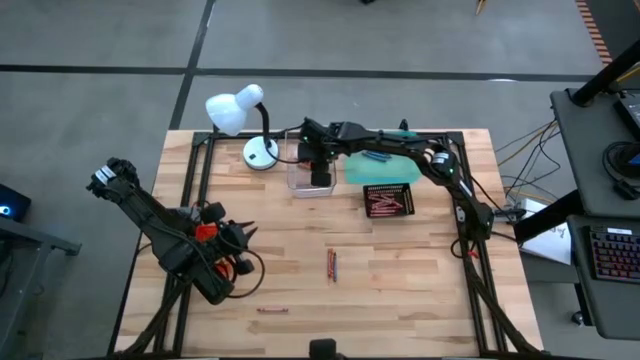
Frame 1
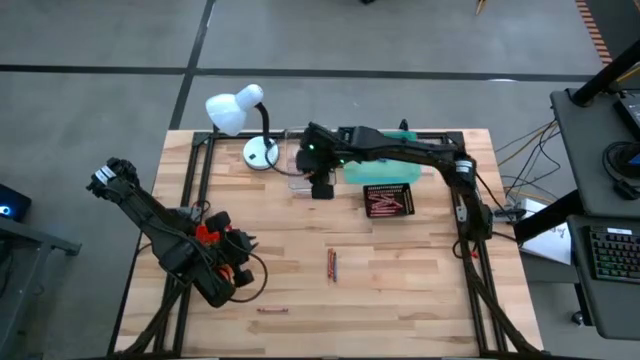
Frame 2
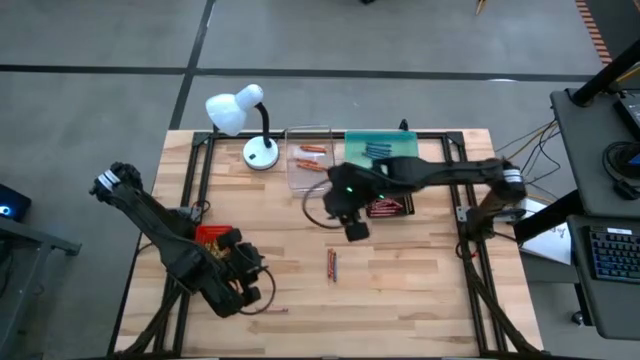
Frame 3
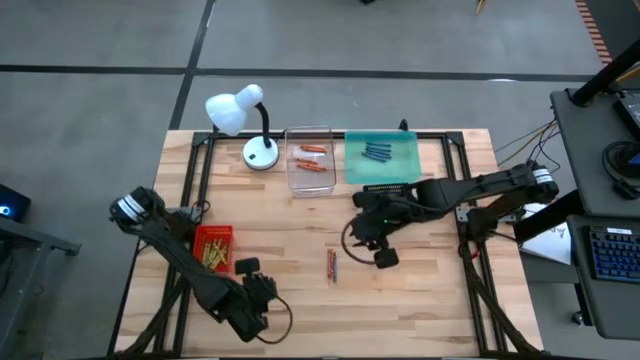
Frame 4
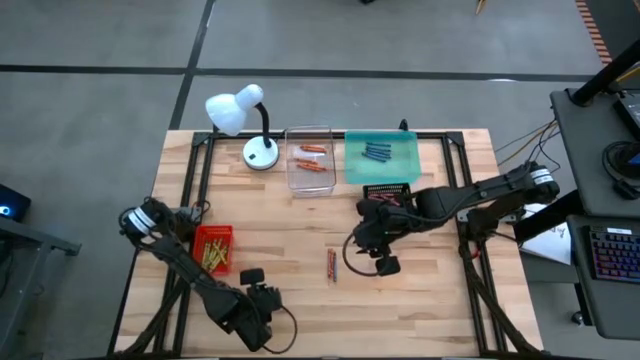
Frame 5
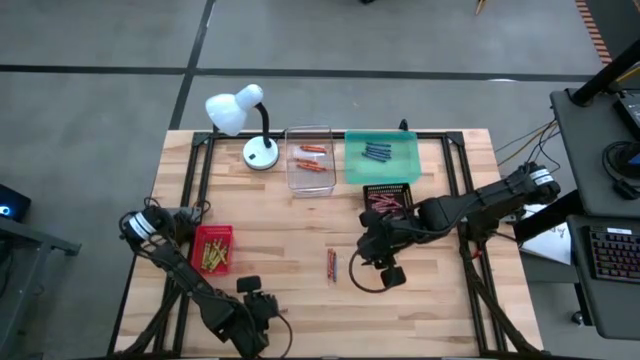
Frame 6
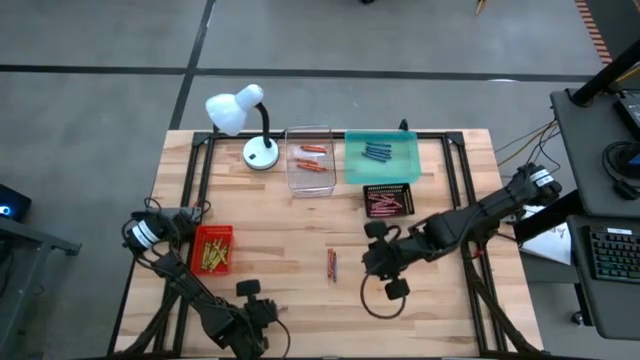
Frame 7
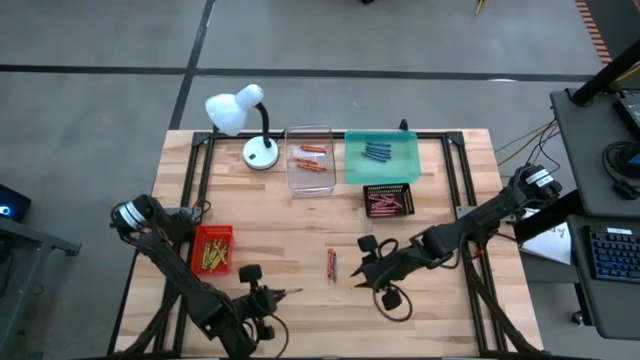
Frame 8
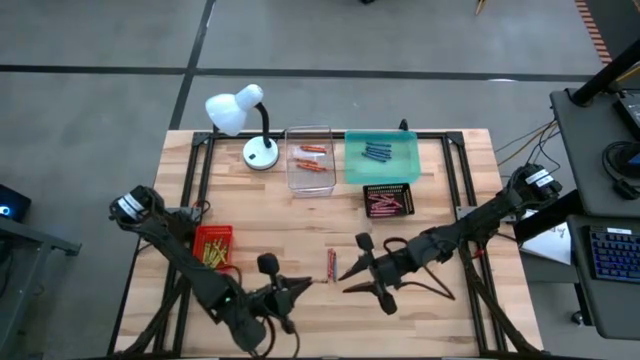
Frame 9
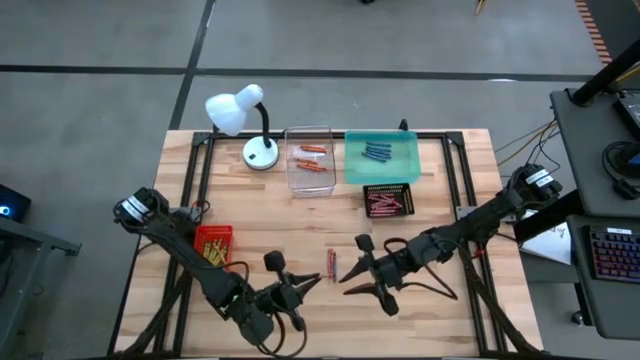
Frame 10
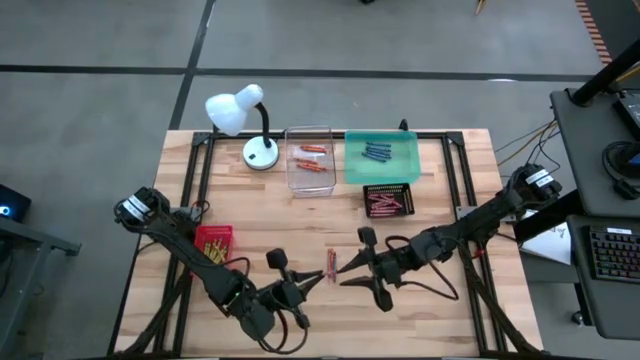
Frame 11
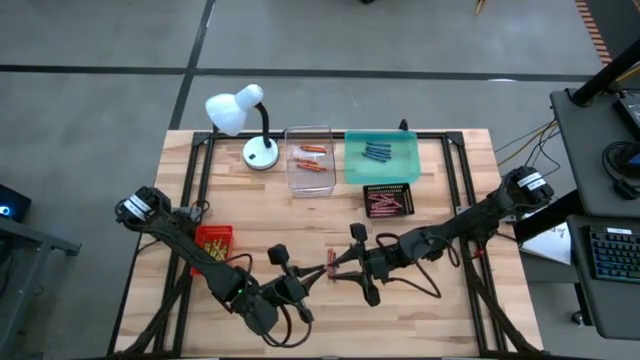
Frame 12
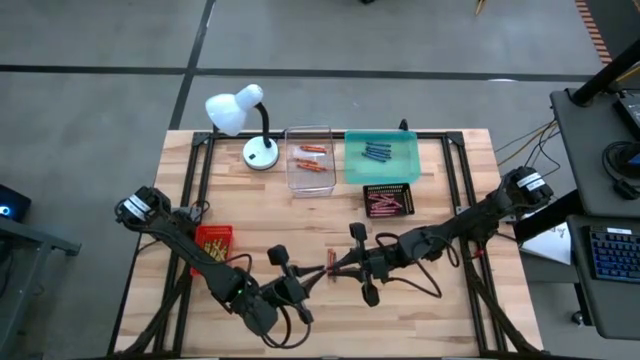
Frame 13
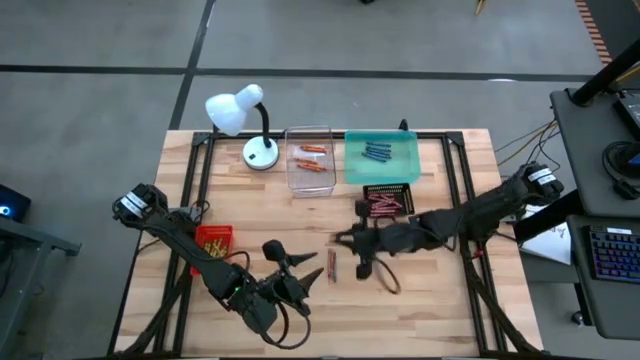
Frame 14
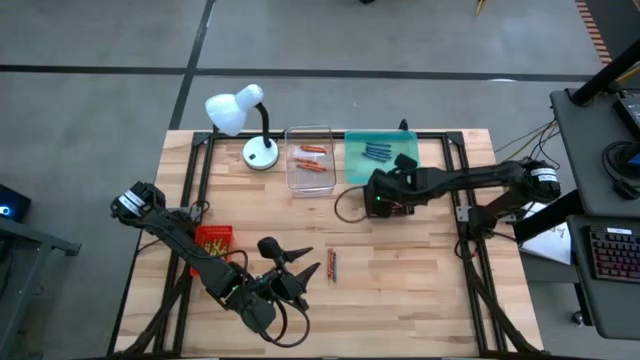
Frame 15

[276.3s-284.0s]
Task: Sort crayons
Put the red crayon into the black bin

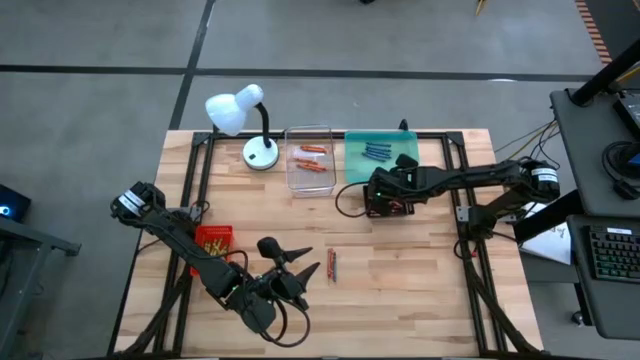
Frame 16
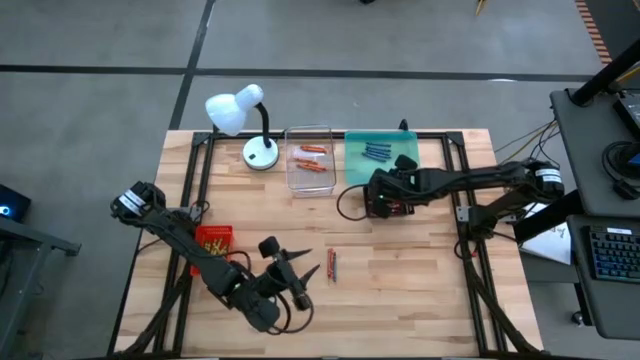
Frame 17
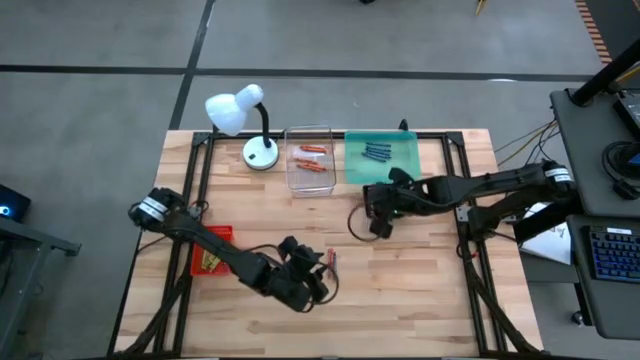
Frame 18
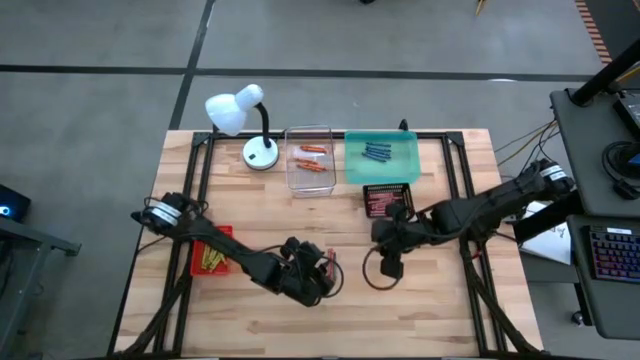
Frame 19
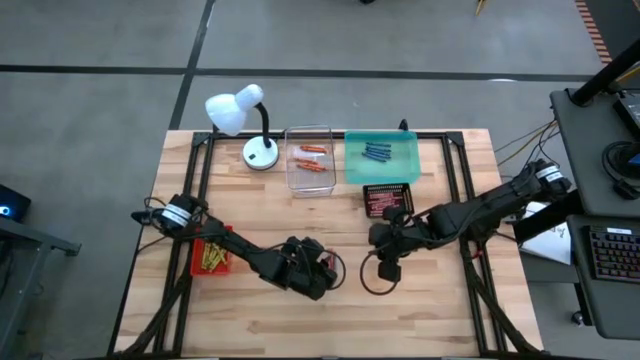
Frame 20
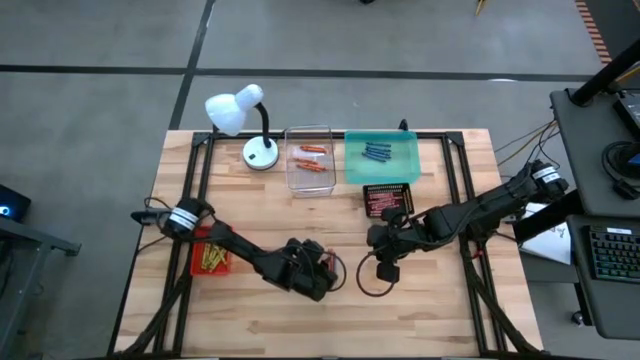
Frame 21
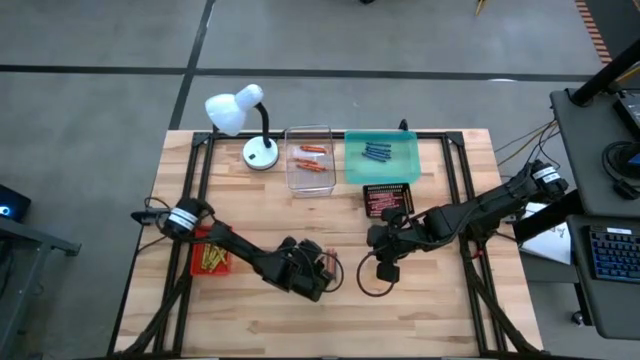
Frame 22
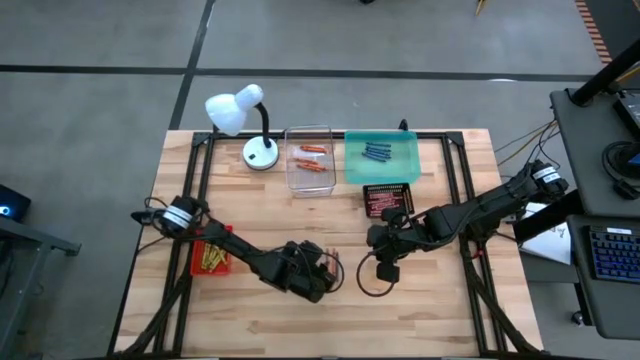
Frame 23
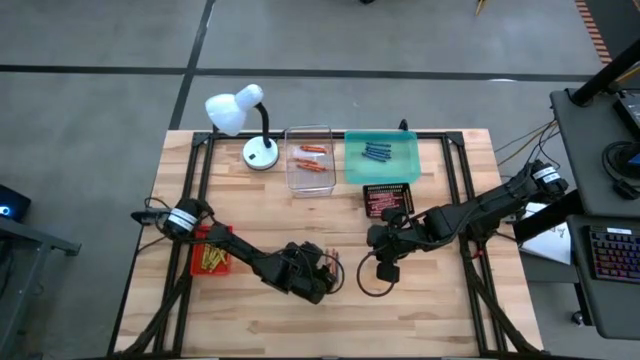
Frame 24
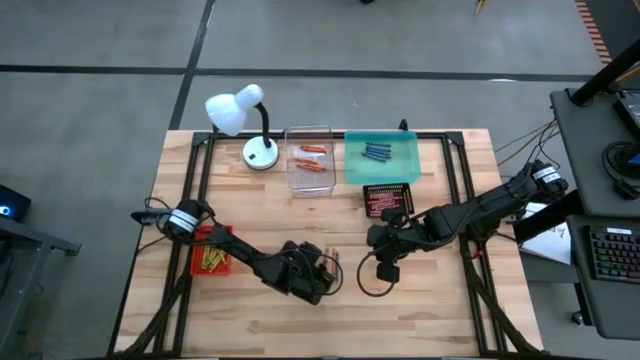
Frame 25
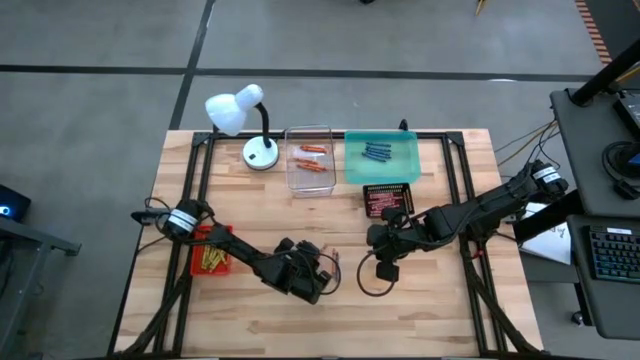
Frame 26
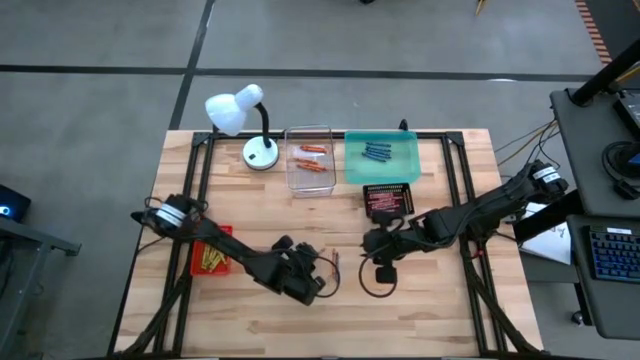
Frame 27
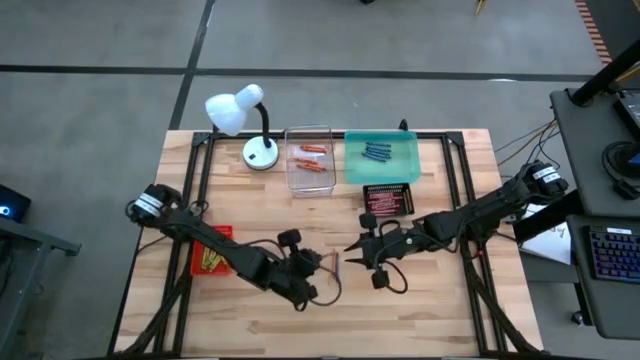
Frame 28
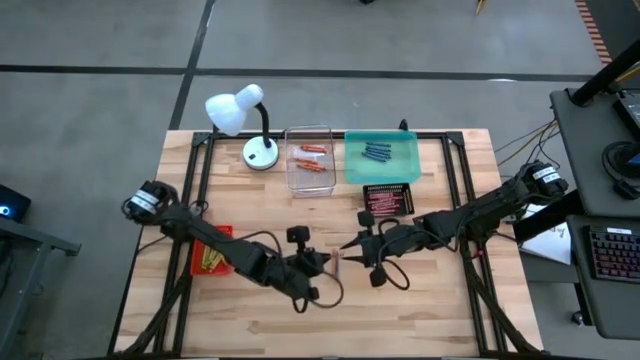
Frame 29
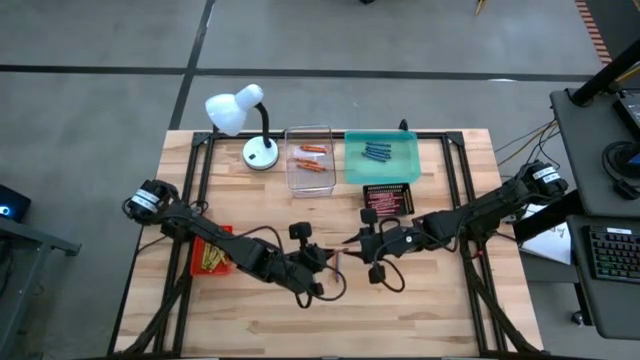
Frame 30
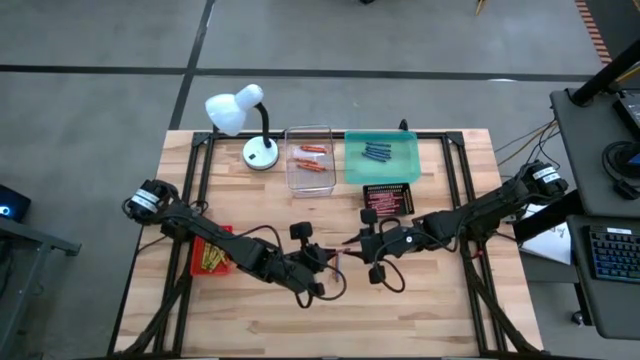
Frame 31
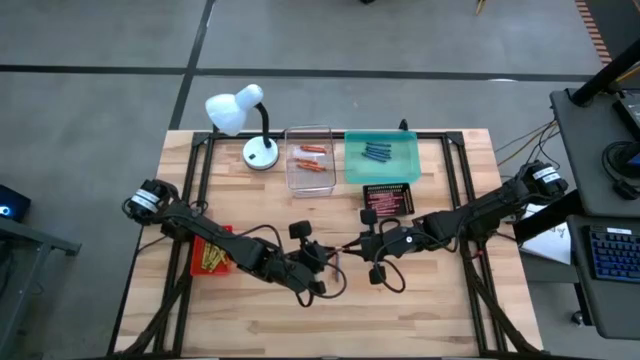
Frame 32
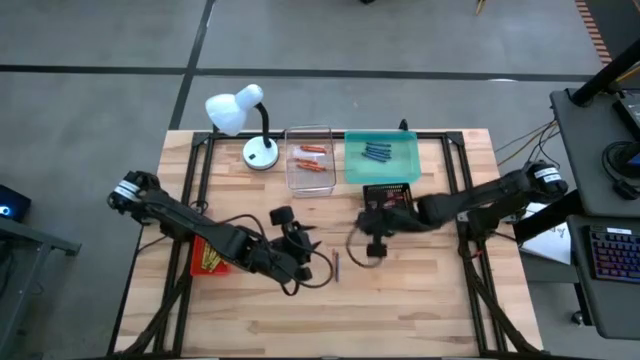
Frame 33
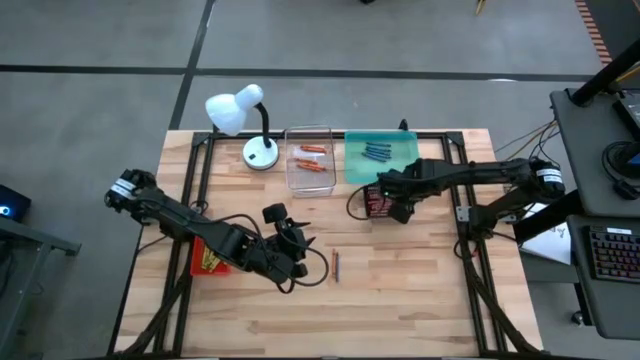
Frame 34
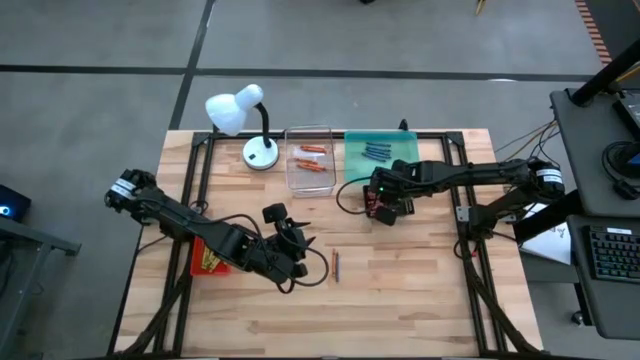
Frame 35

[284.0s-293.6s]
Put the red crayon into the black bin

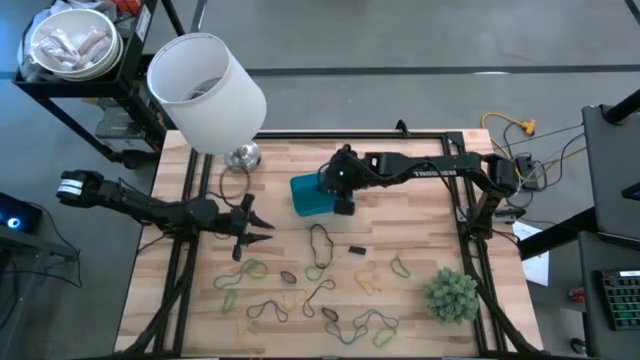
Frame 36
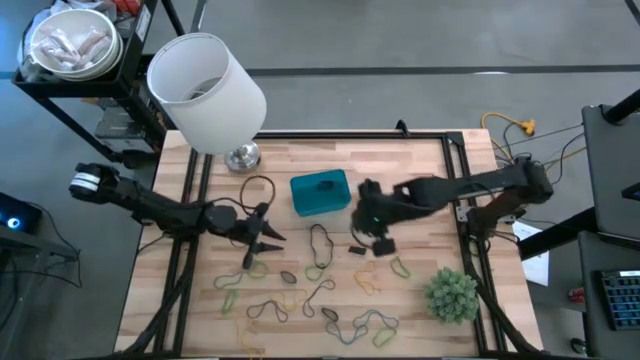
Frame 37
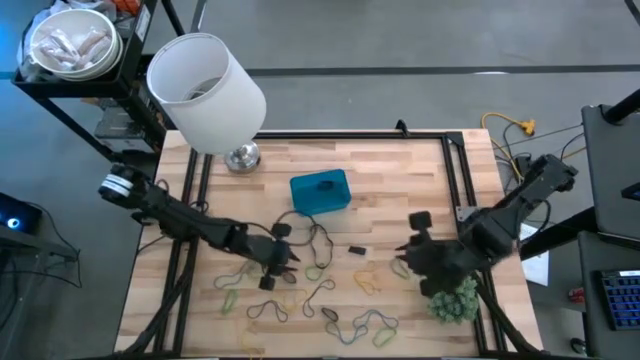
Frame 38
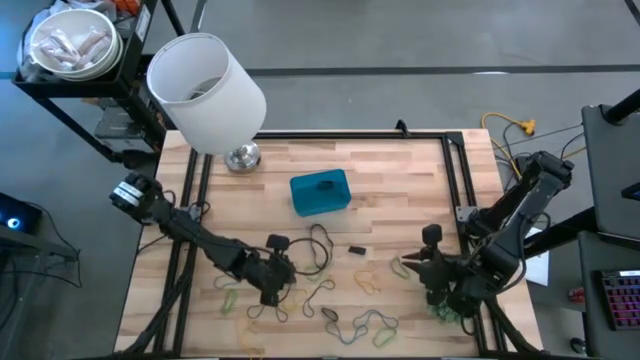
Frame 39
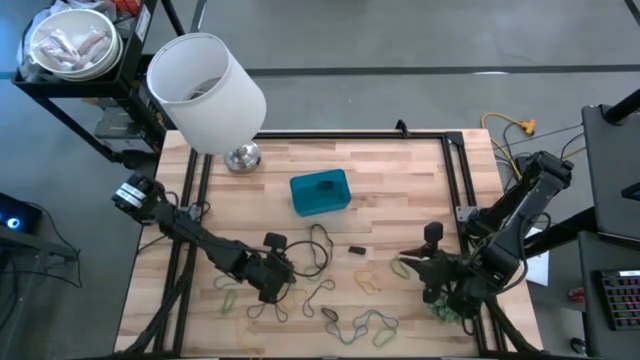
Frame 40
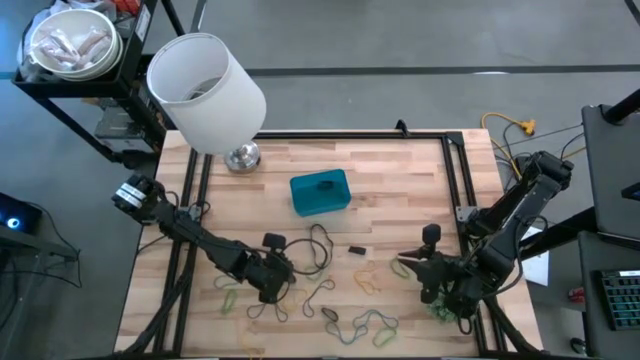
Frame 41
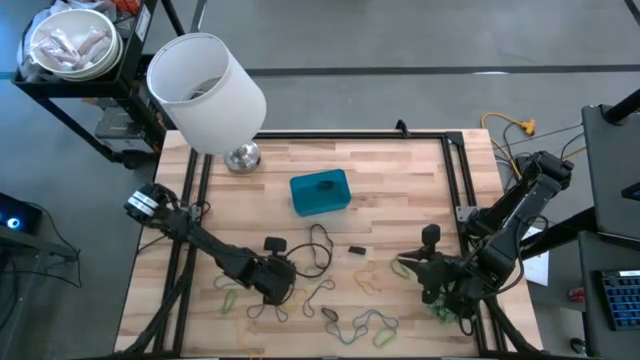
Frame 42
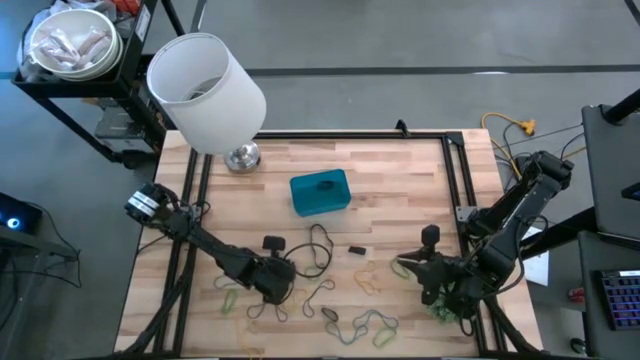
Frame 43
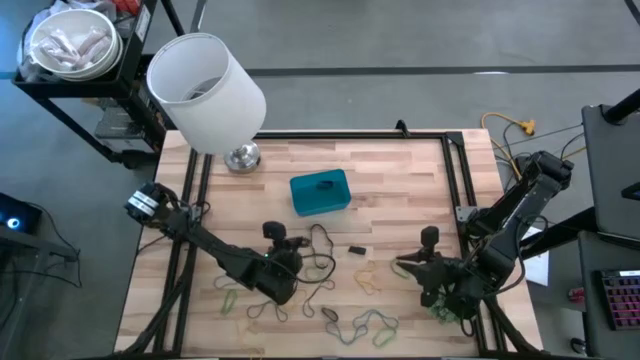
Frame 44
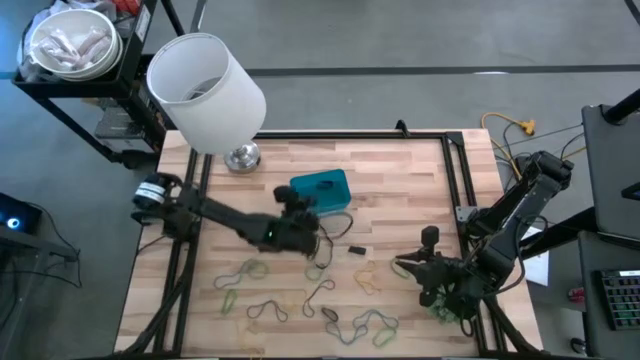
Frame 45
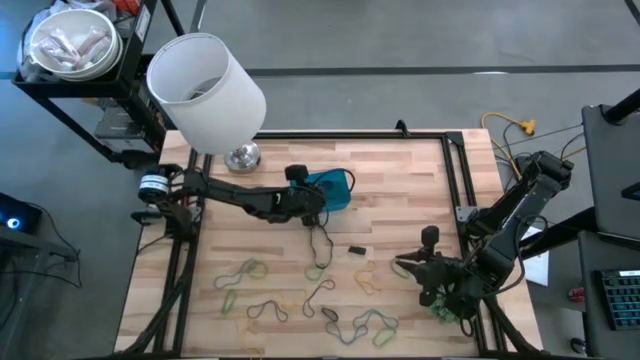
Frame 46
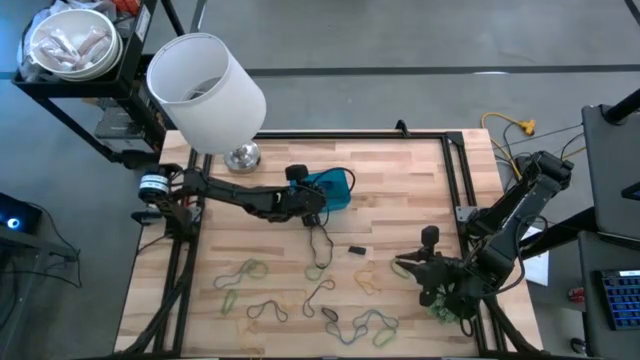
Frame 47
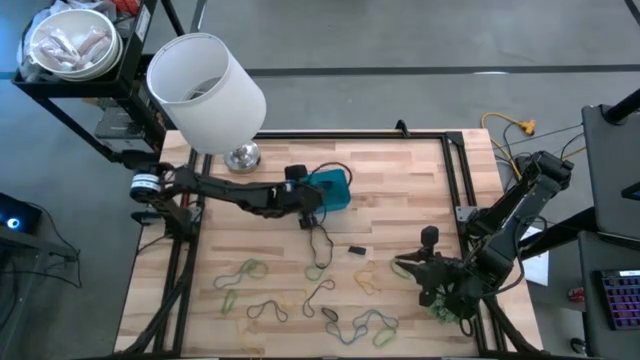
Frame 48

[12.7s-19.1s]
Task: Pick and place rubber bands into bin
Put the black rubber band into the blue bin
